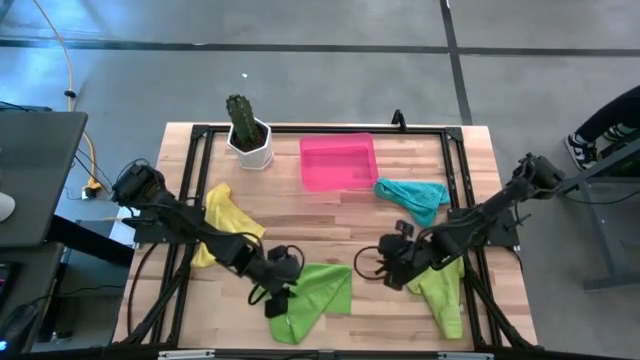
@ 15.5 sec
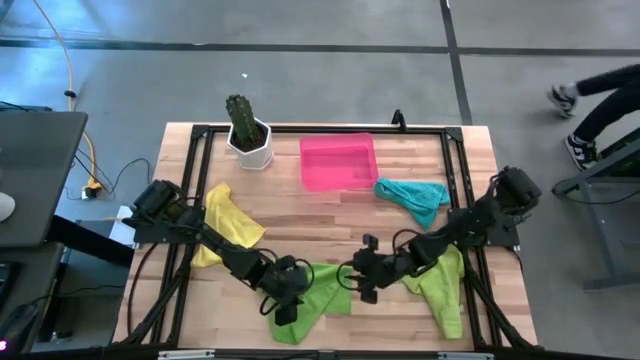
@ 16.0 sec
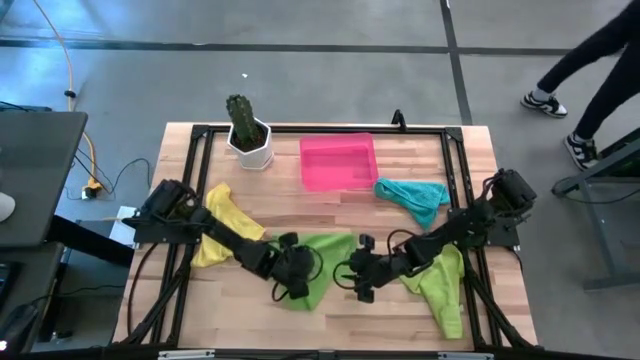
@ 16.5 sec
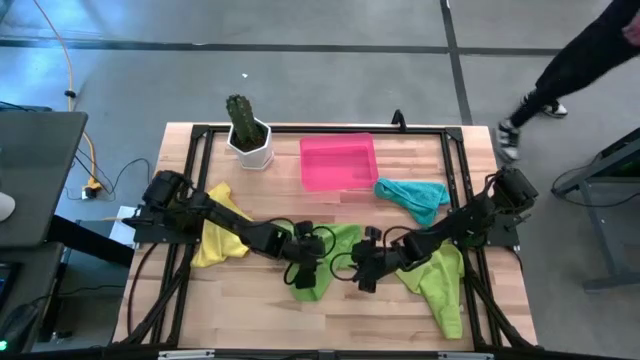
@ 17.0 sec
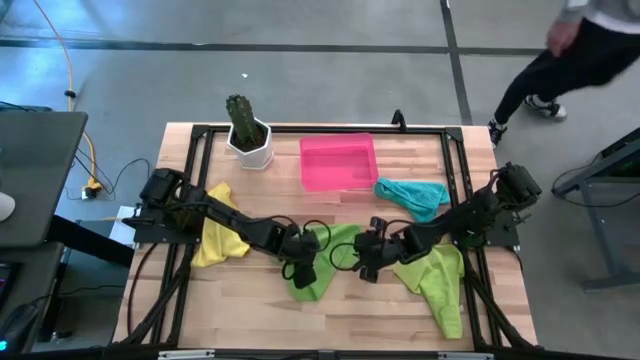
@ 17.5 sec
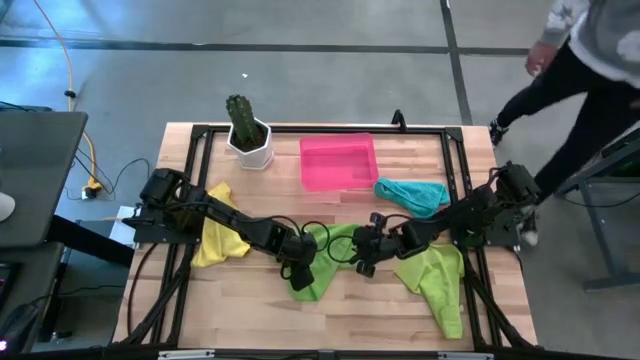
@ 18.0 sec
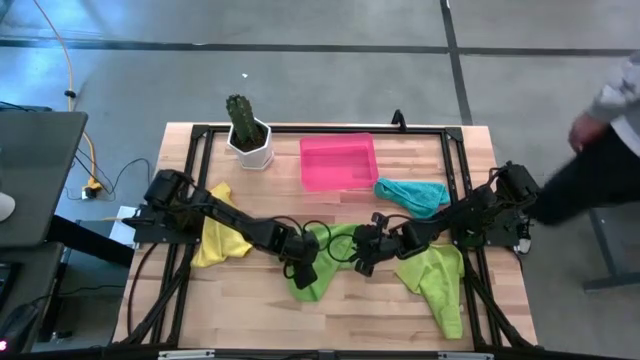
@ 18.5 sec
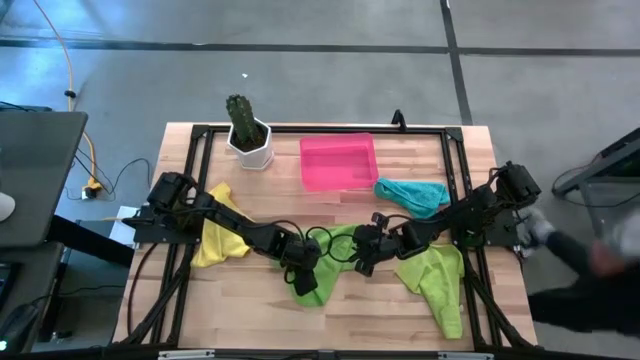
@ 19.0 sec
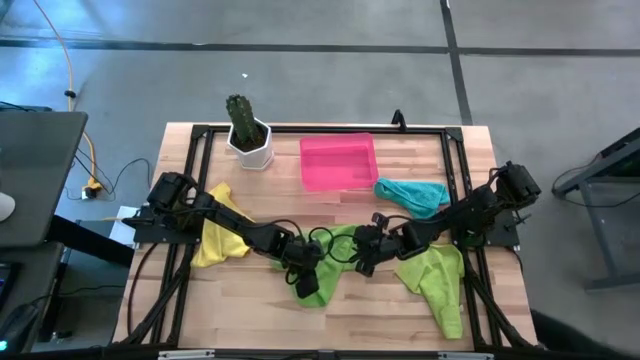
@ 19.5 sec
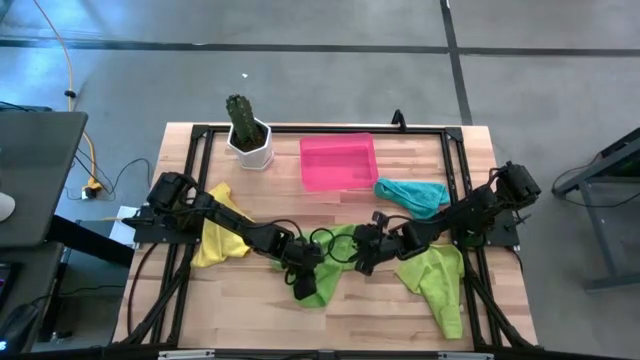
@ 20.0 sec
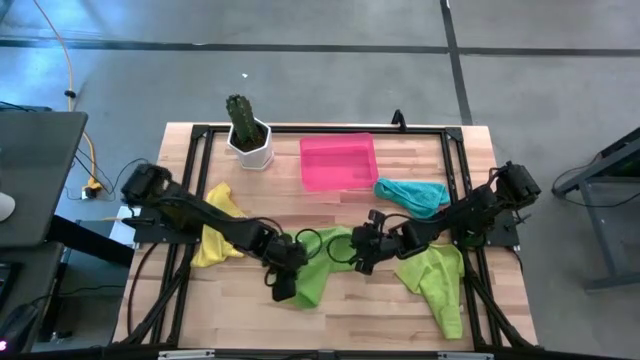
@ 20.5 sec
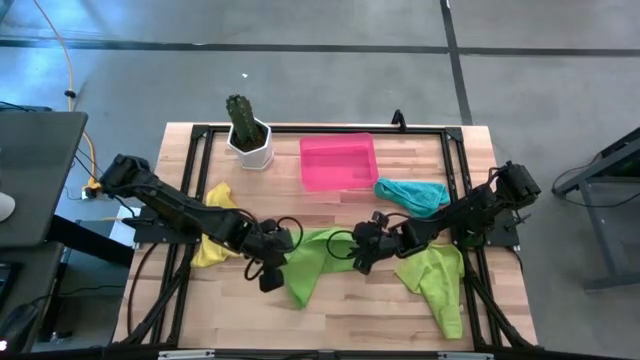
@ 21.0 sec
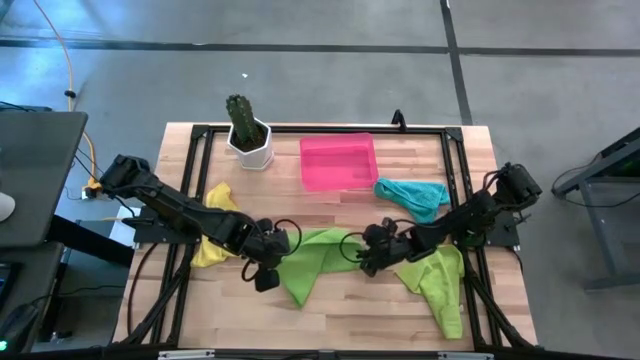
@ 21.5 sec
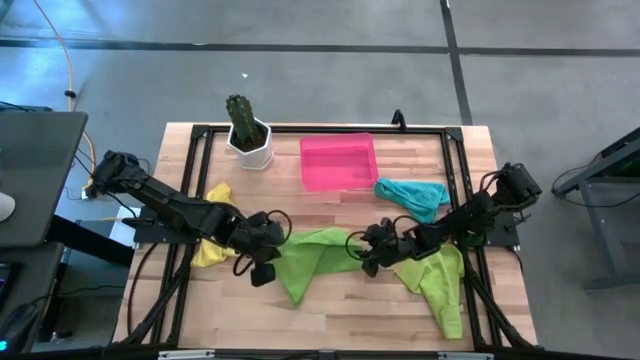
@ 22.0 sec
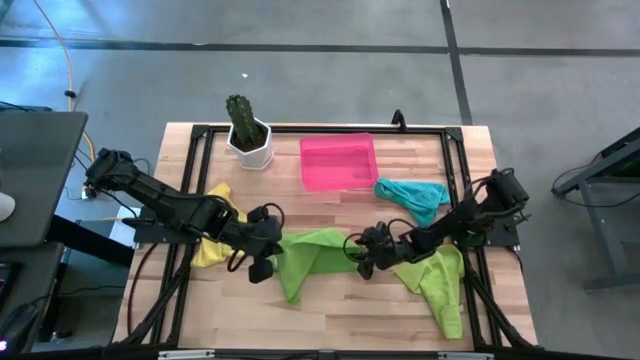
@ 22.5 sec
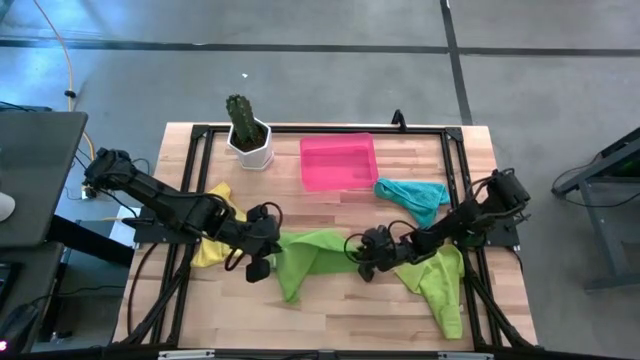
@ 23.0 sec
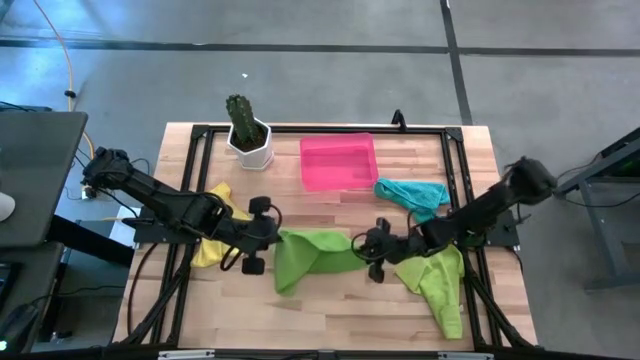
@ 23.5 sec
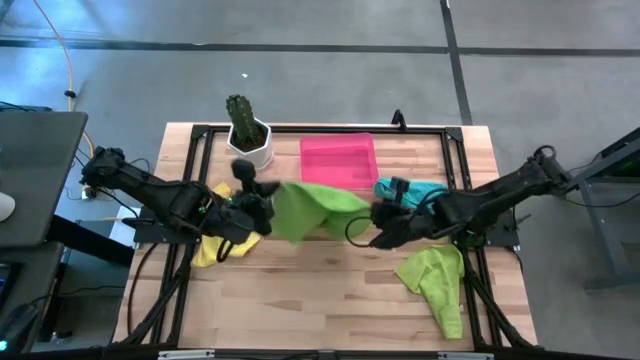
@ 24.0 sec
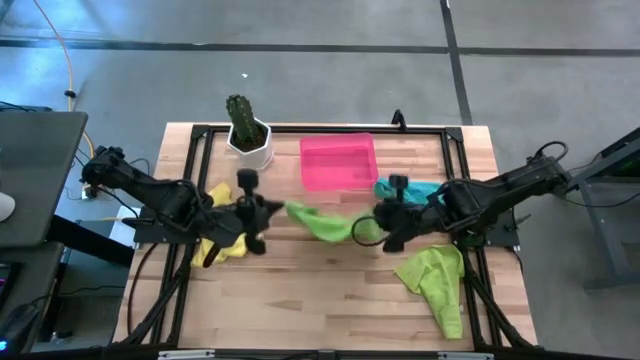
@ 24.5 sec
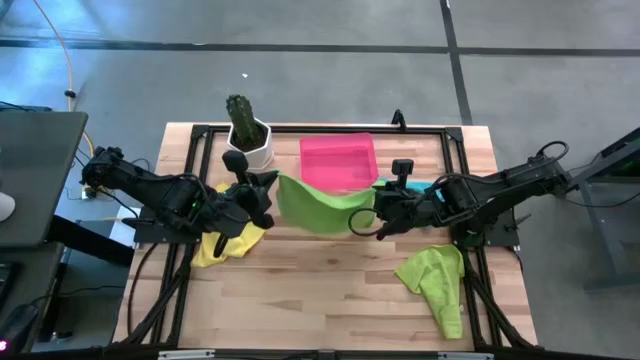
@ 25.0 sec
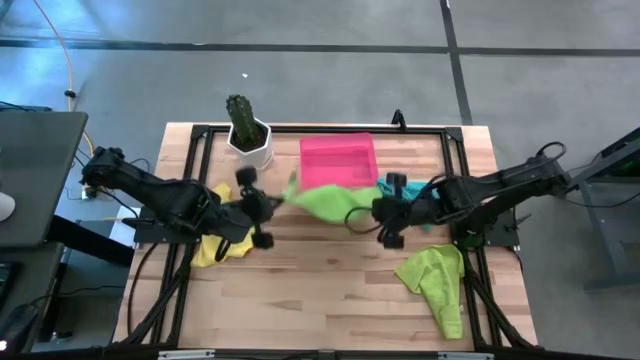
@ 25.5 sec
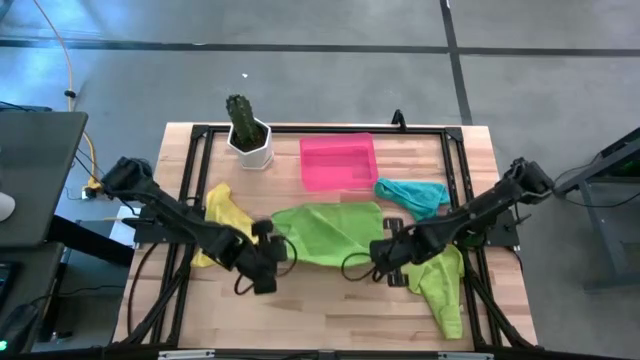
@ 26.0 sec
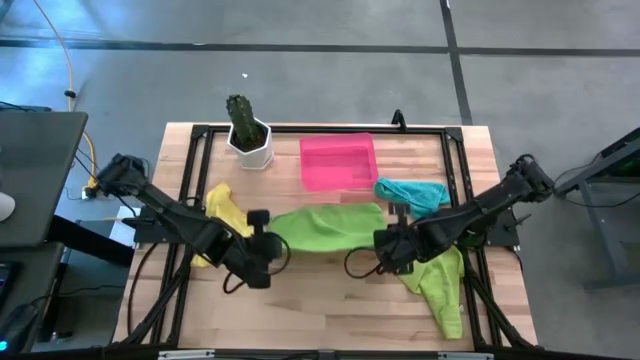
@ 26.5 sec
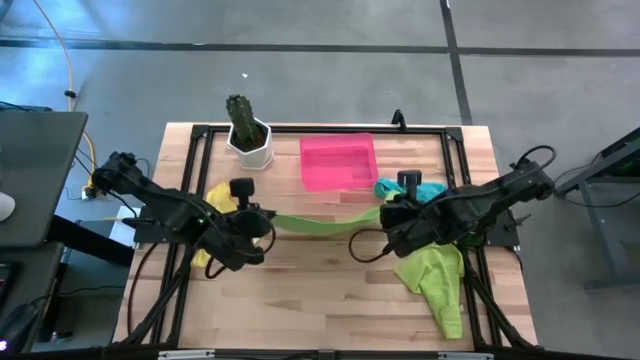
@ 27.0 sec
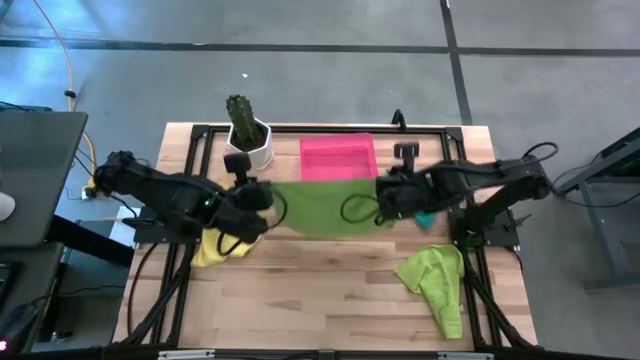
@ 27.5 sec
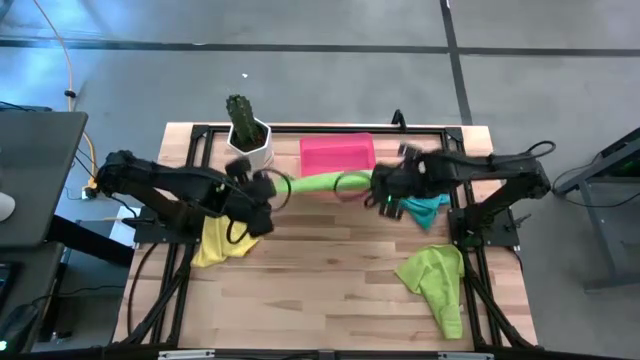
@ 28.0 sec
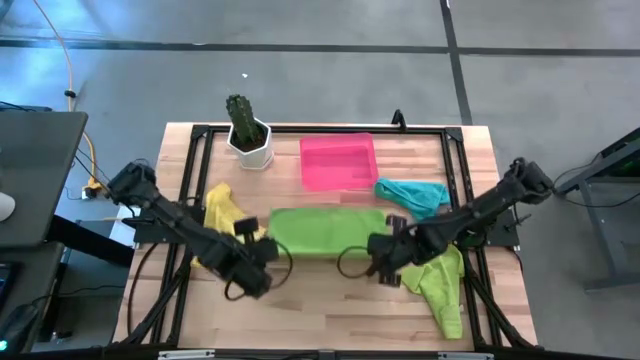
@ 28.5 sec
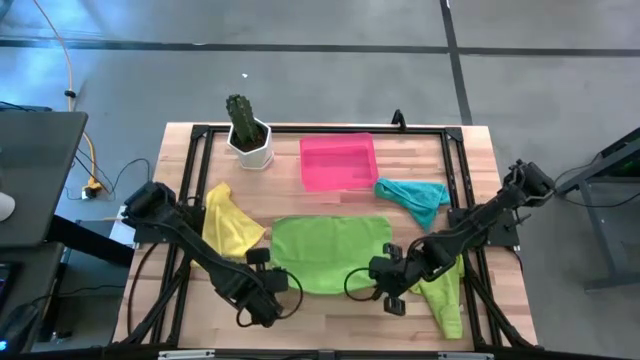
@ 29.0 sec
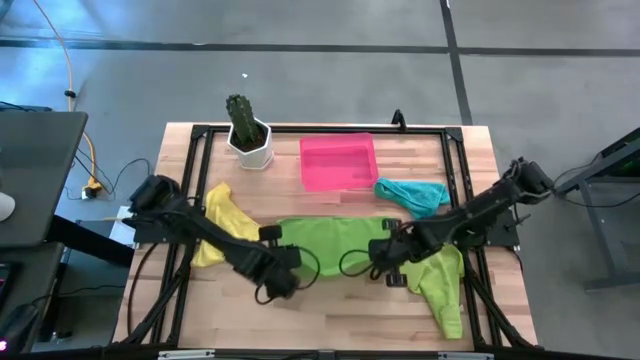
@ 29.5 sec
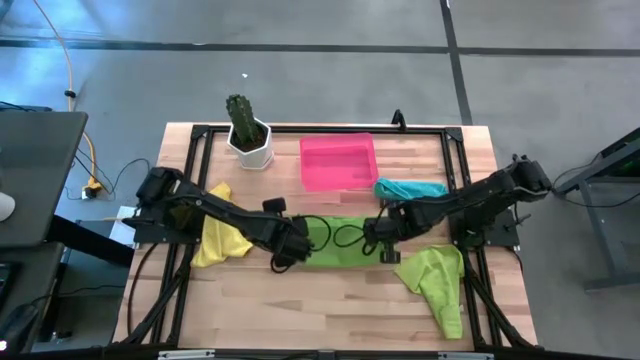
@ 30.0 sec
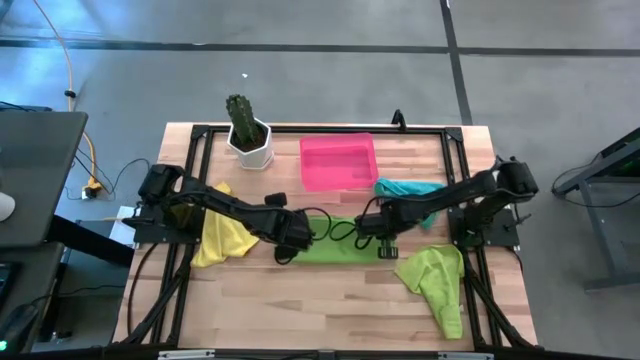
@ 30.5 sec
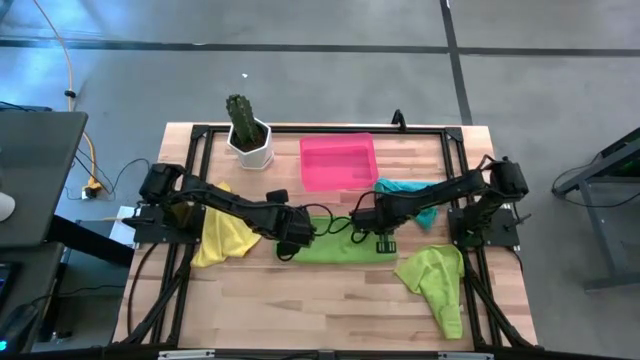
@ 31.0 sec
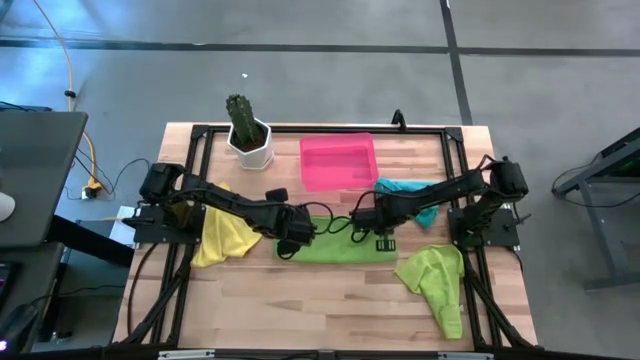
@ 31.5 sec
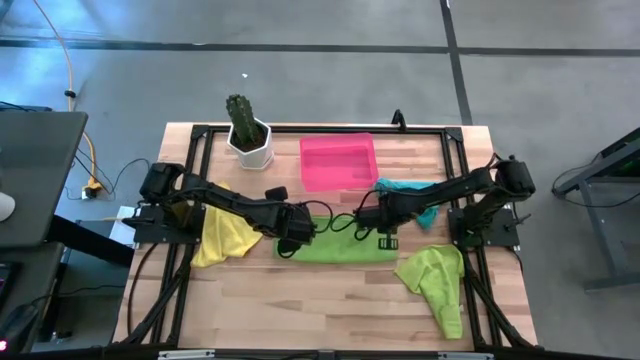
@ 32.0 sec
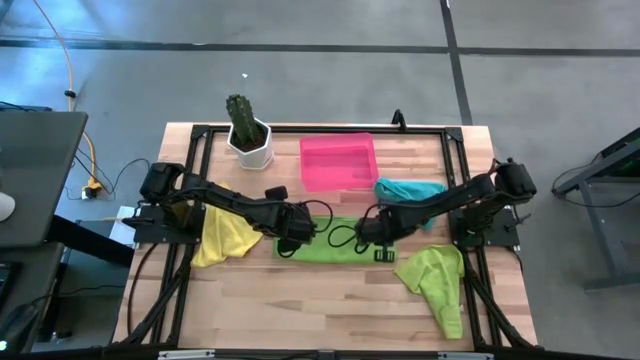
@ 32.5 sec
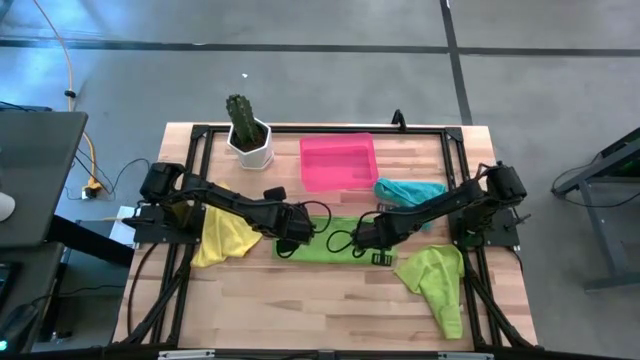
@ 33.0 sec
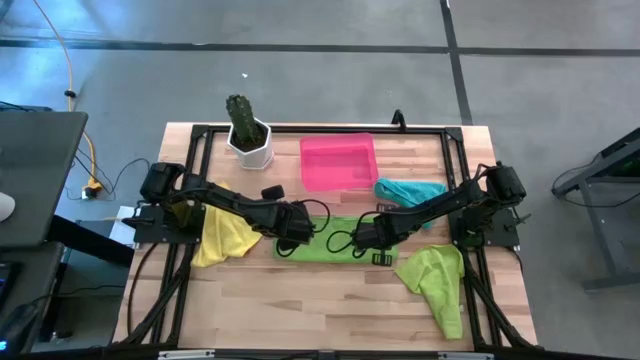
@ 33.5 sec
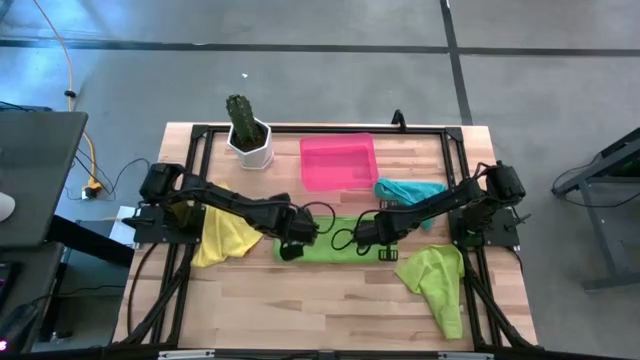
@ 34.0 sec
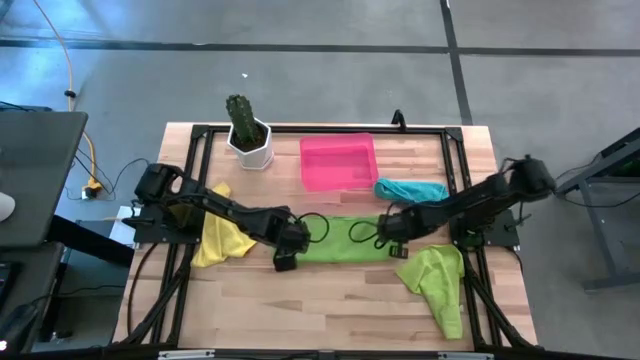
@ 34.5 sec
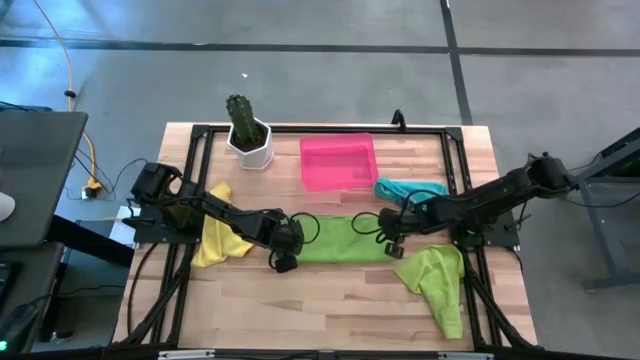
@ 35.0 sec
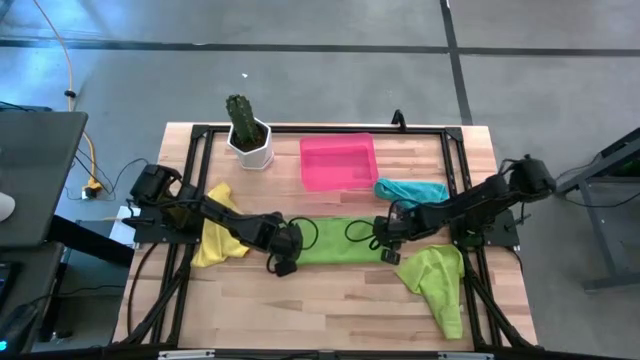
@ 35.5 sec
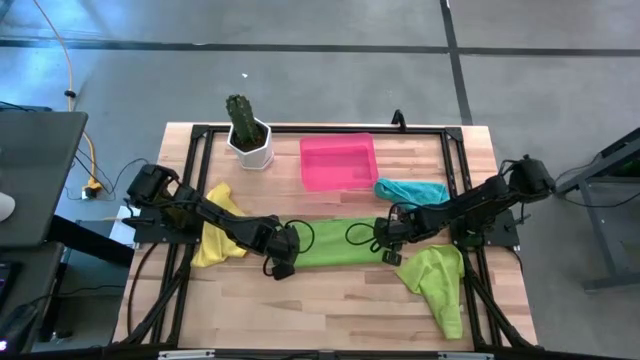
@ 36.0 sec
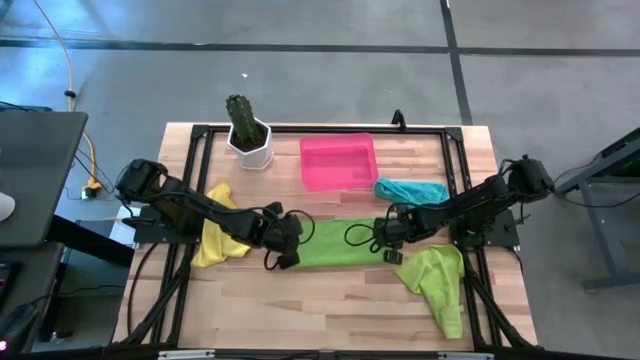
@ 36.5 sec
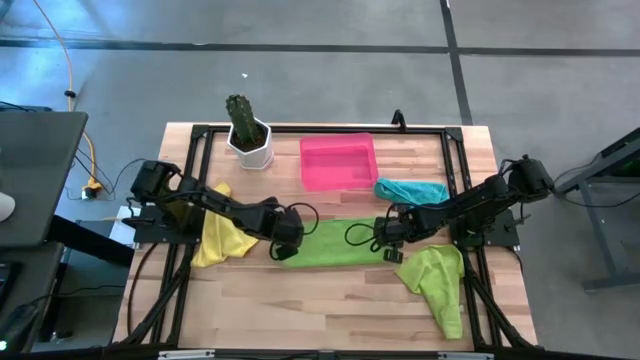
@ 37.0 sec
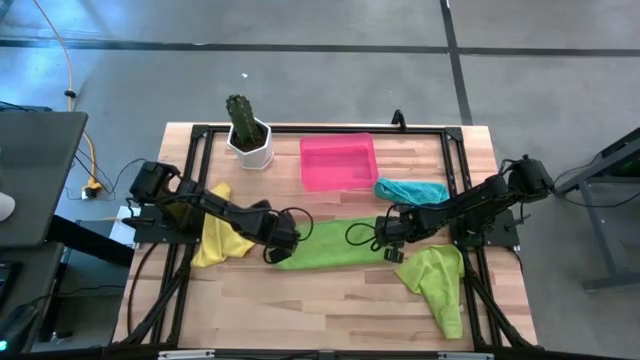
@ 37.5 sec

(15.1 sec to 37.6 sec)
Task: Roll microfiber towels into tight, uniform cylinder then place into a basket
Roll the green microfiber cloth
